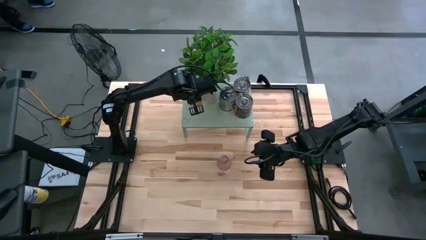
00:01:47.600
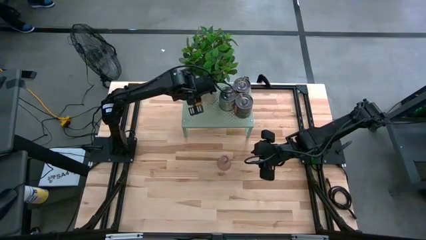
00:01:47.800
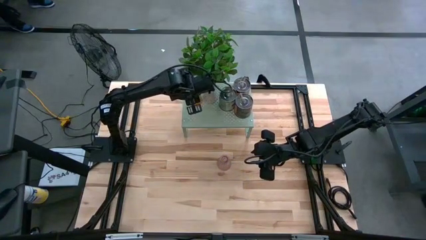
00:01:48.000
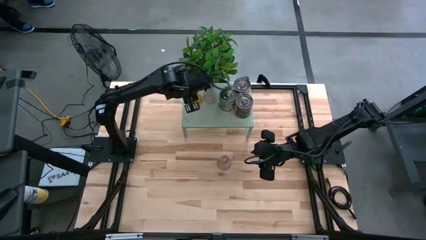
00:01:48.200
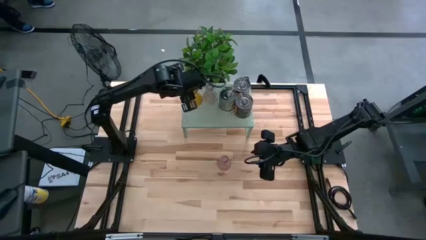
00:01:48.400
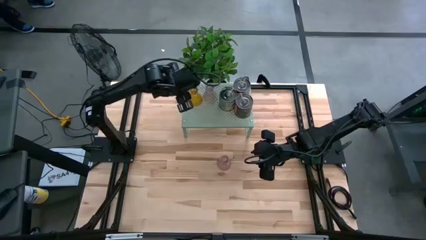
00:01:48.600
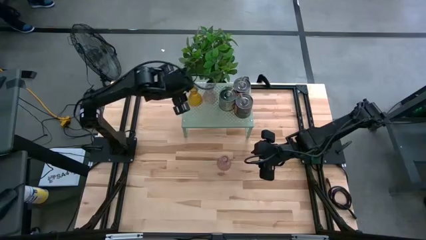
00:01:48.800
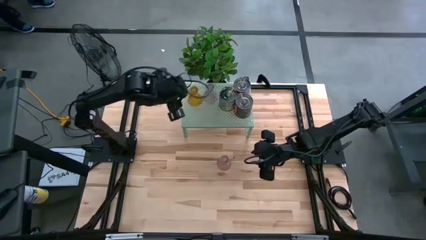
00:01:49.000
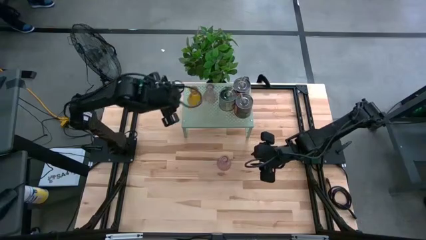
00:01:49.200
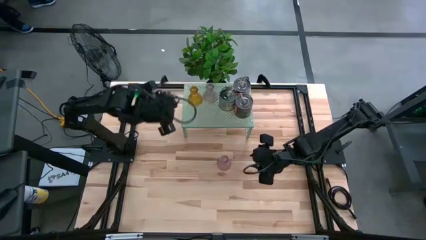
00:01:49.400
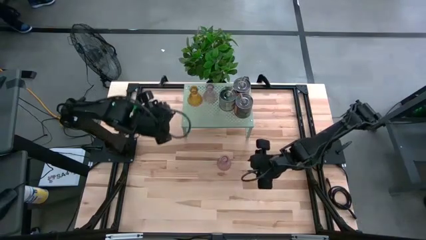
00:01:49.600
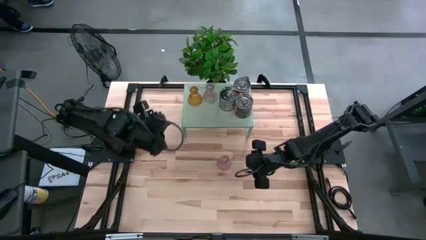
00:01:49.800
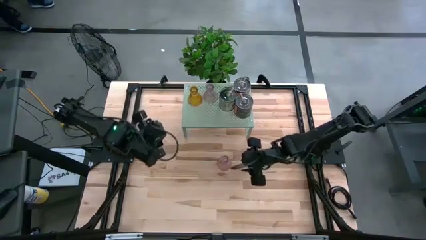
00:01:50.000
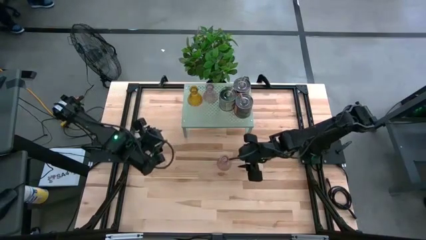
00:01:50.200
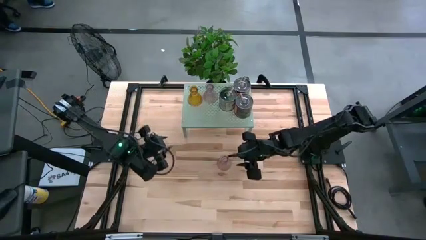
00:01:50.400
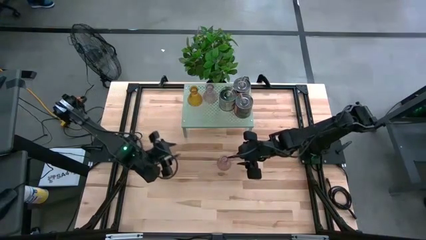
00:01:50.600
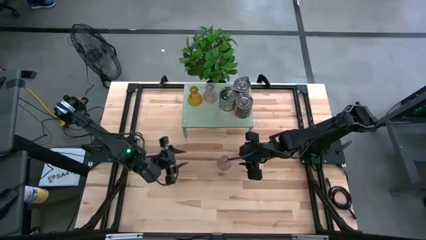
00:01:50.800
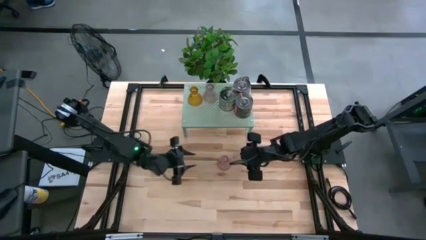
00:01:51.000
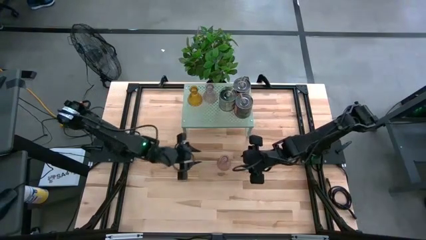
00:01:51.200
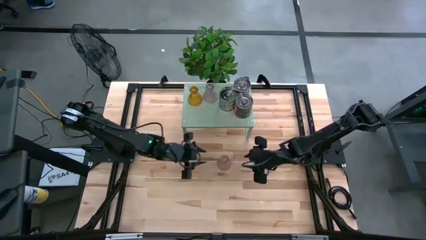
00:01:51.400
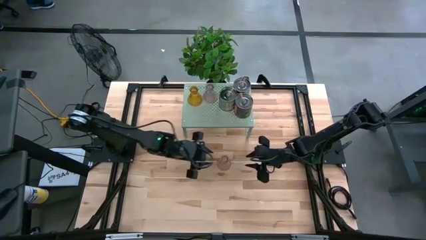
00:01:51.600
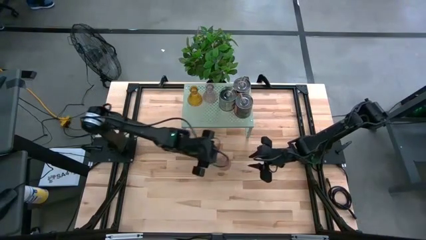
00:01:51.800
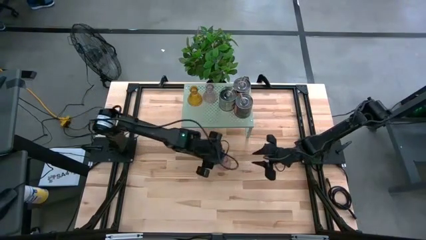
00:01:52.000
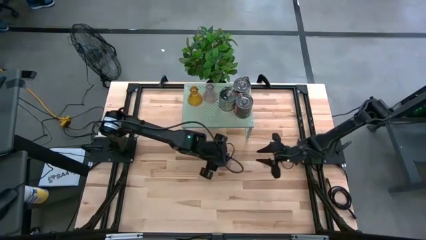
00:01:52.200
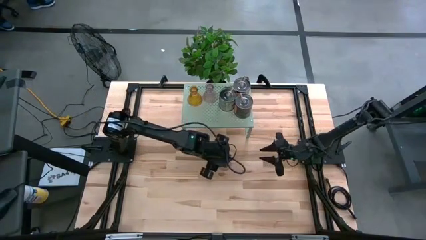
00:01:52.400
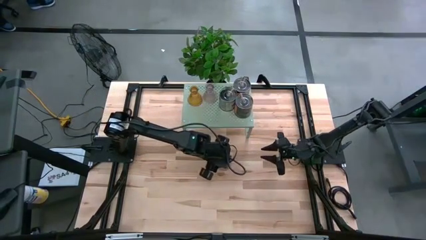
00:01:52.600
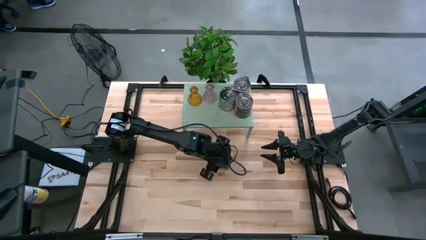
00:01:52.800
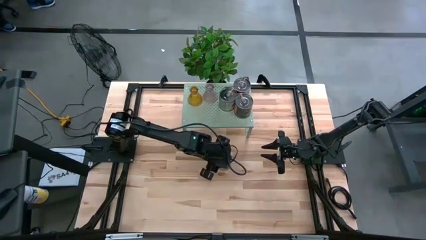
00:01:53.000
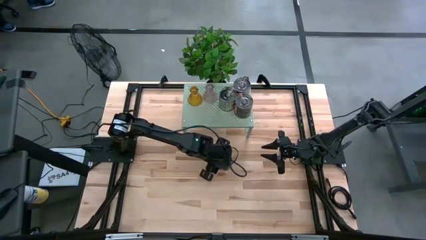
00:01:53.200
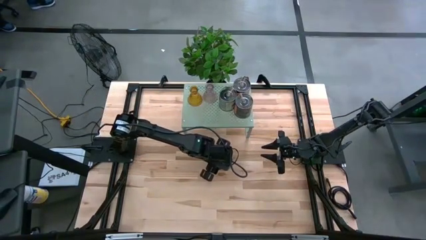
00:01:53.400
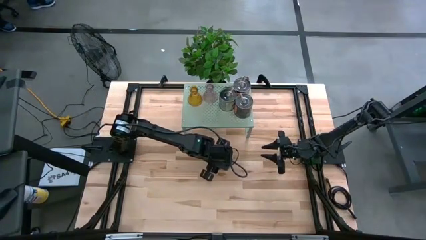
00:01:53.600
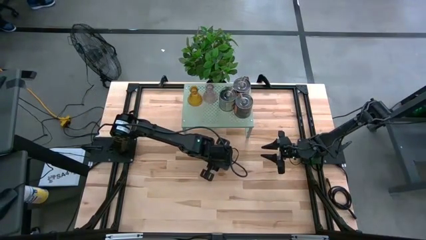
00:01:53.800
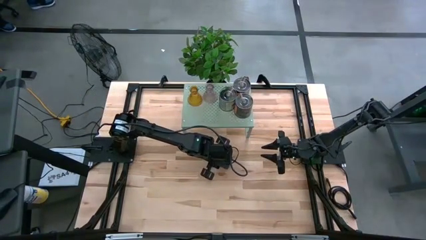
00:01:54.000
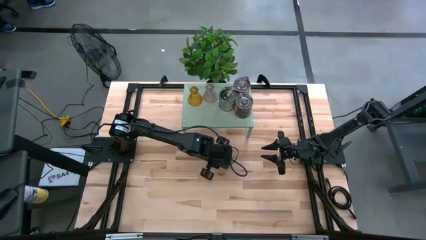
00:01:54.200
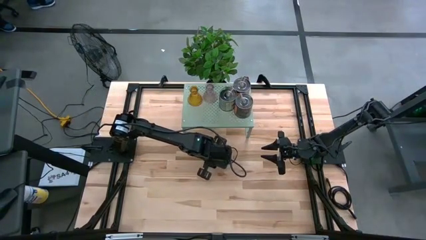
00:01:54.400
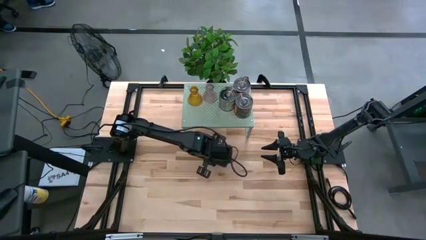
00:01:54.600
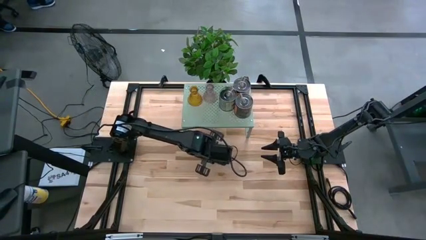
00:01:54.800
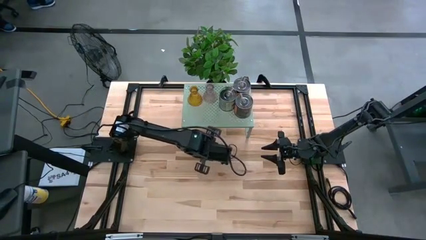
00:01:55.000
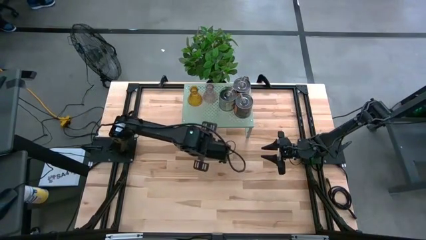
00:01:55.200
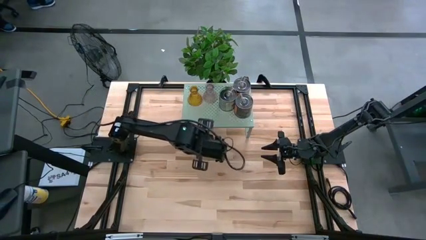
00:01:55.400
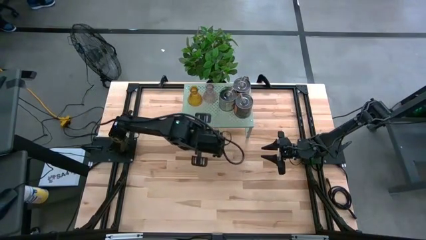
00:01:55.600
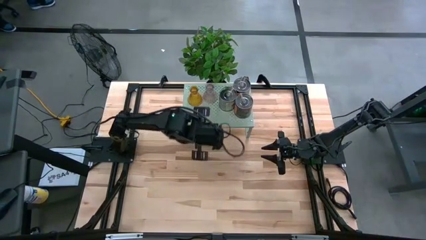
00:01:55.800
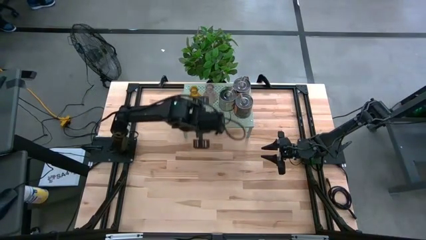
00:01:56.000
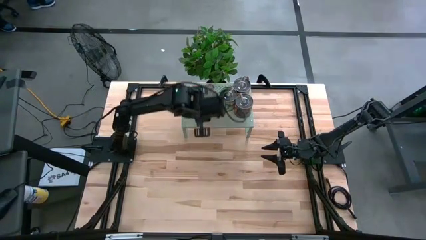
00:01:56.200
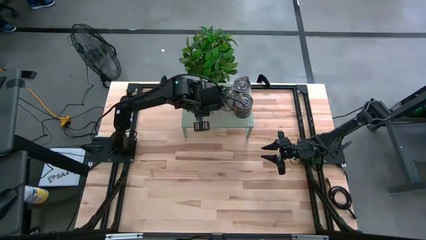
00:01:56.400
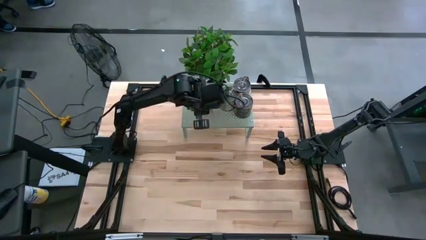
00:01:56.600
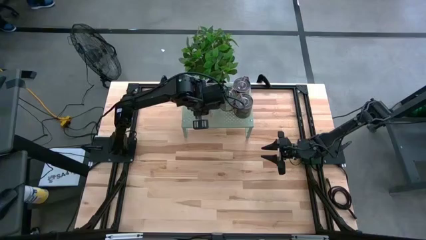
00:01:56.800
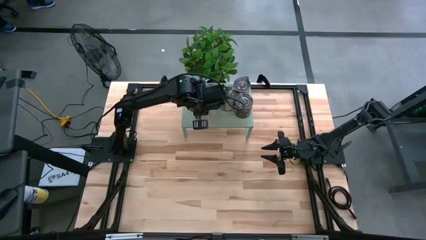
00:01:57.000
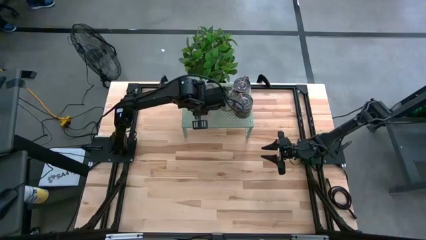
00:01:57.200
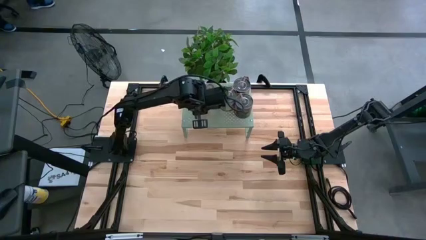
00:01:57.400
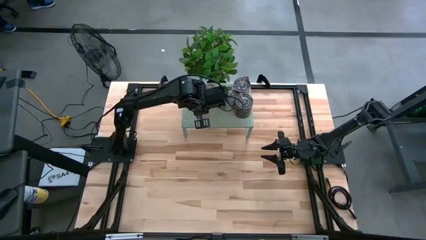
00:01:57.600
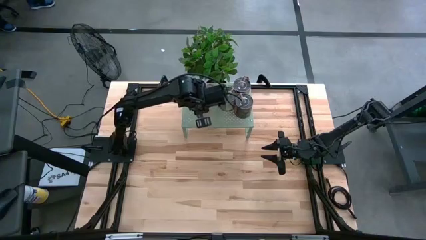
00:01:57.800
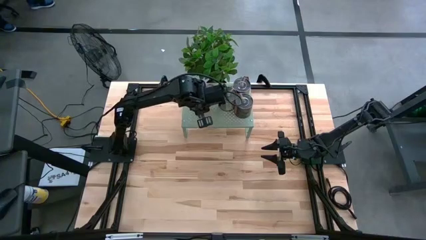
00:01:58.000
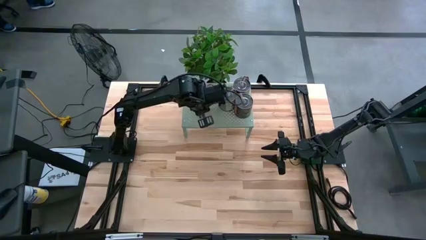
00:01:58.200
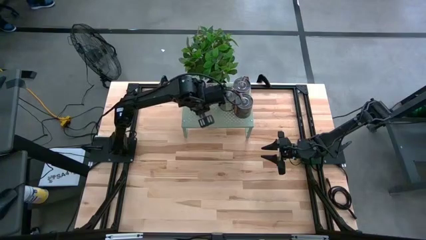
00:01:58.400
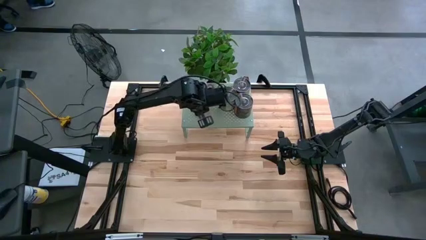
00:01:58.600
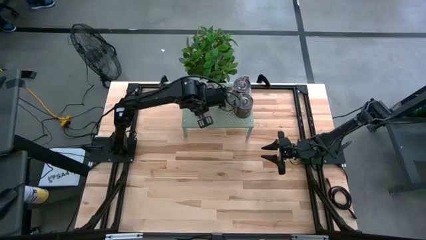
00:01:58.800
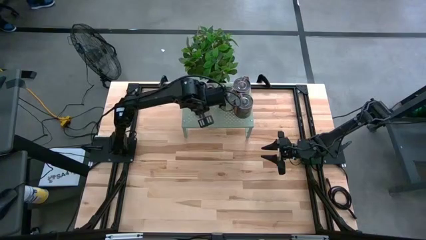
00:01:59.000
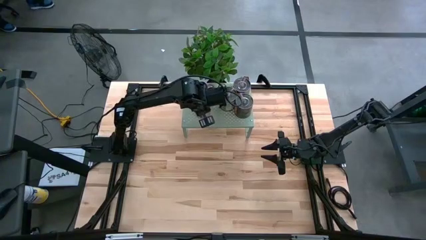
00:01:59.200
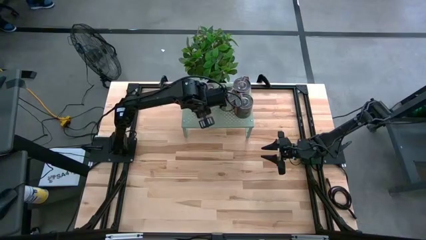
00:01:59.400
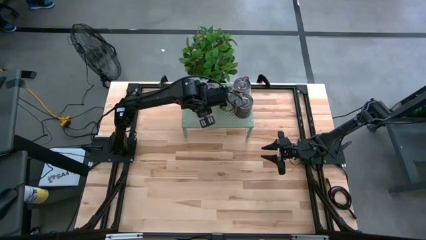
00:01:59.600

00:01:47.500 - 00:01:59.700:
Task: Pick & Place candle stick holders
Align the pink glass candle holder with the other glass candle holder on the shelf

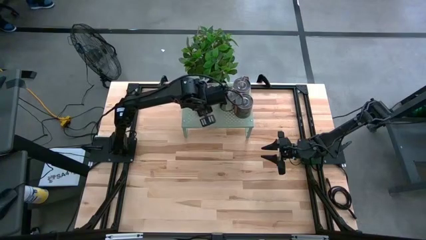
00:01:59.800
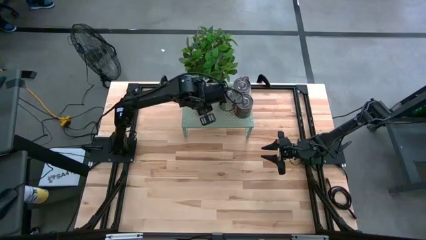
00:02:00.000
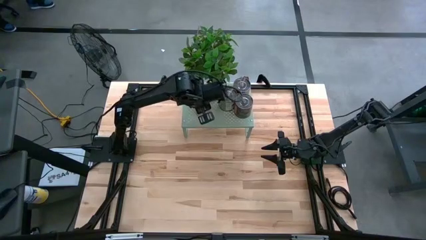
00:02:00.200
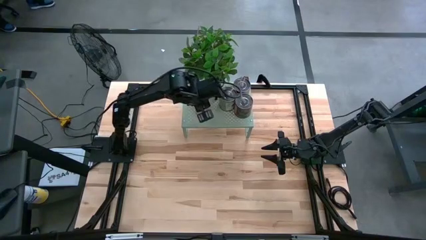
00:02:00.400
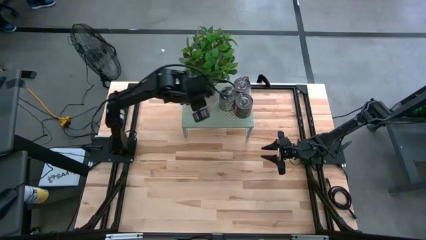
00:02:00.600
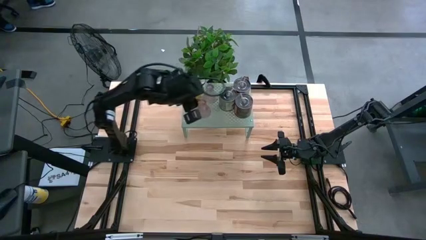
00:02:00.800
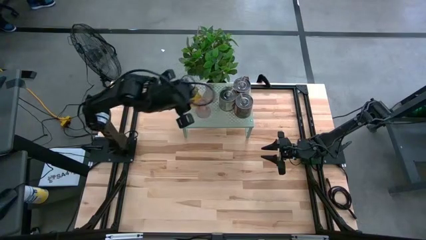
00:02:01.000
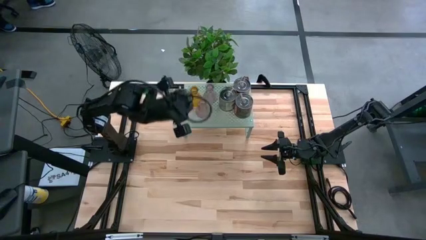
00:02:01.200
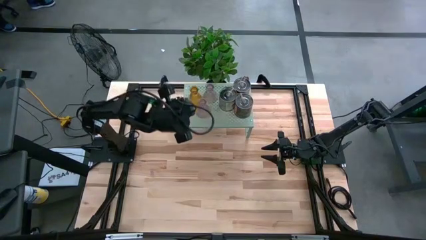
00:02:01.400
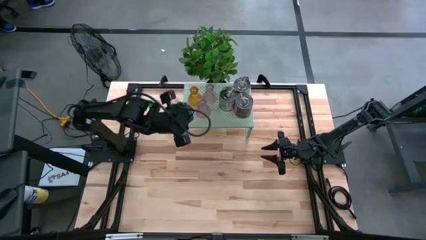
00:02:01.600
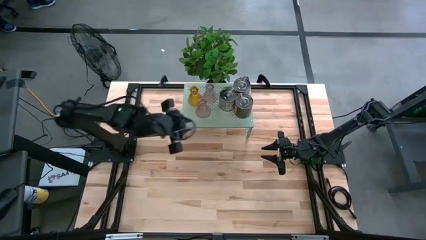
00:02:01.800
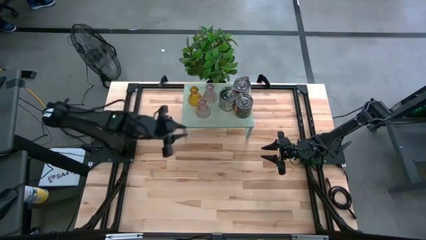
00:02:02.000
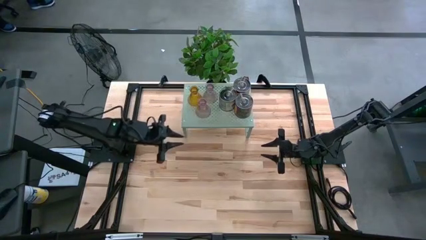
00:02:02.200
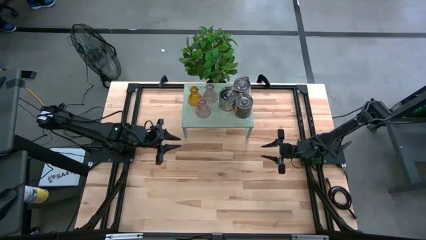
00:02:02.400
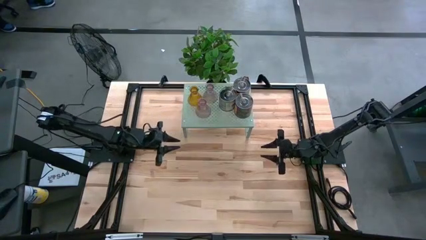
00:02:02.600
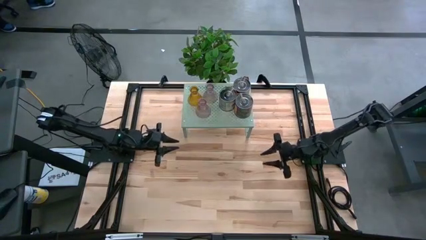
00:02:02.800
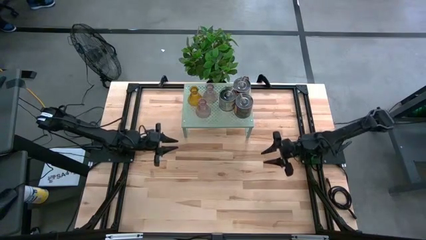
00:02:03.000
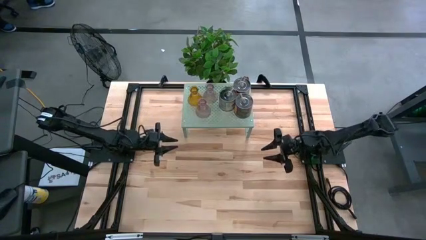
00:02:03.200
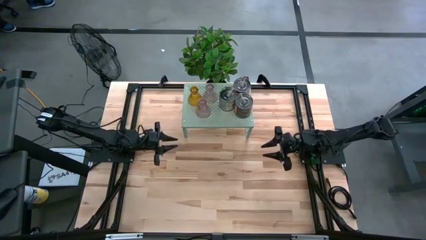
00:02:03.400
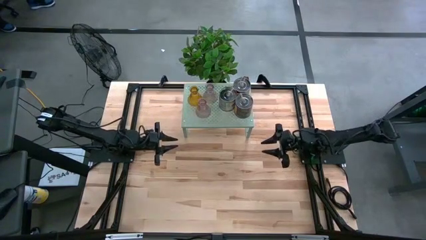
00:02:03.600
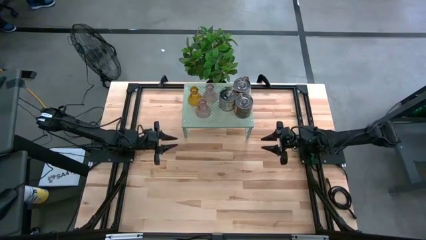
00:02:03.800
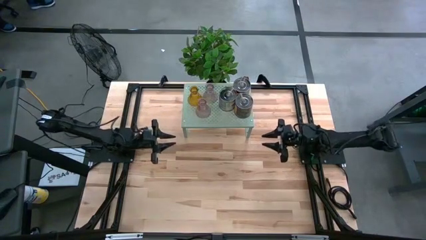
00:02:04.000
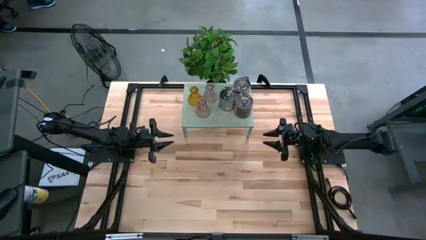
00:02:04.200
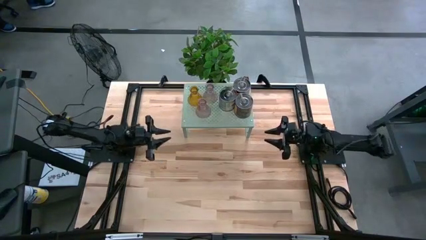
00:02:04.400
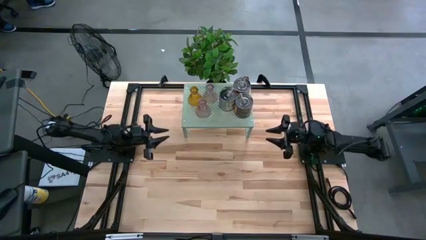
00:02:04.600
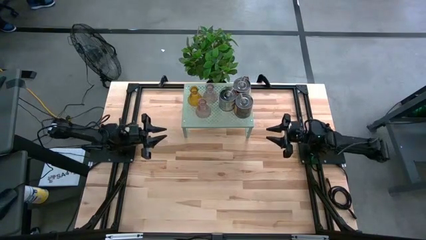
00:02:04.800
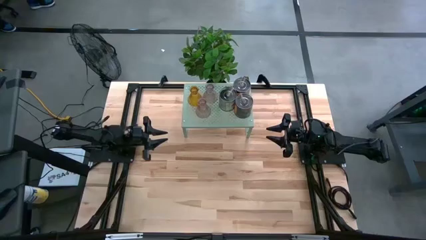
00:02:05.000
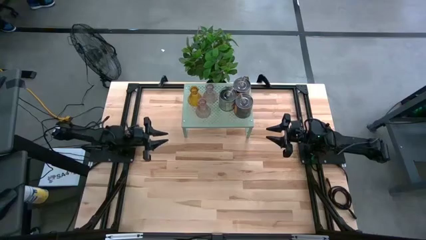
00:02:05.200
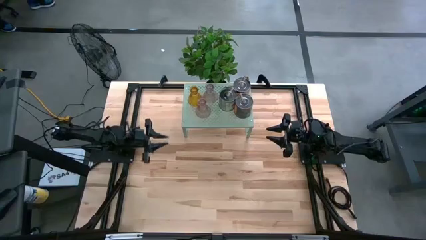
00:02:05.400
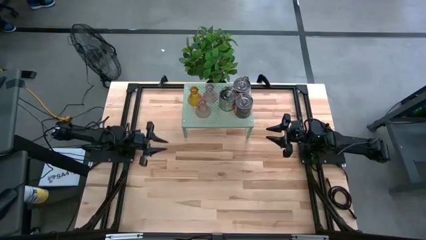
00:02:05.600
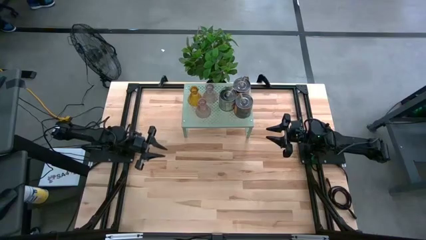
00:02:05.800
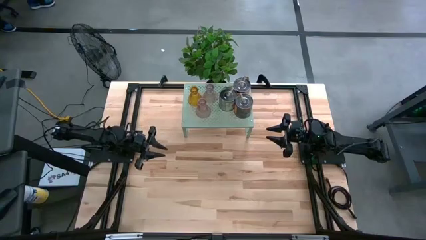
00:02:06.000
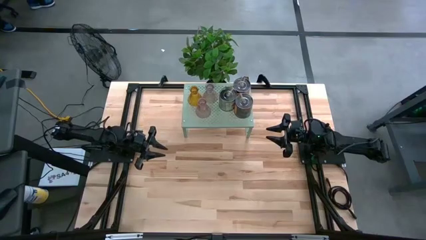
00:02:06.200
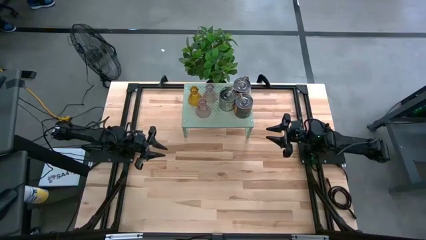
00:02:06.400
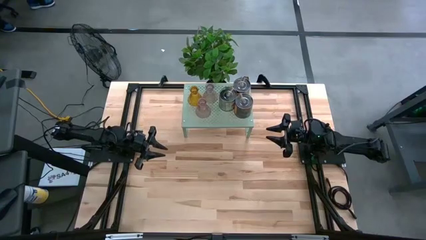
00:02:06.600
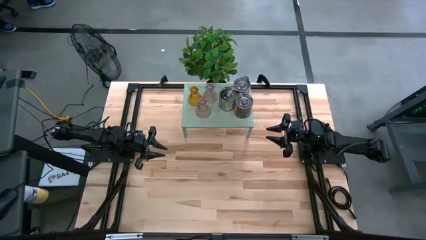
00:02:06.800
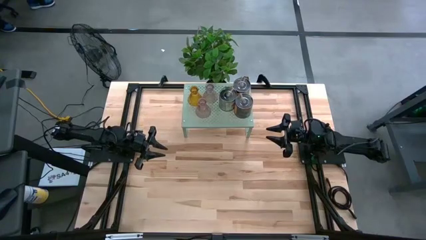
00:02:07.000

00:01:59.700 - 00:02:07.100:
Return to Home Position
